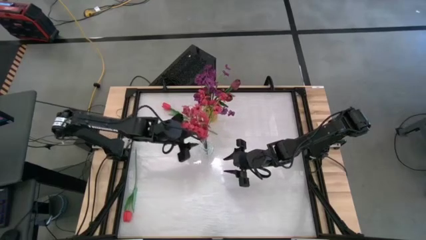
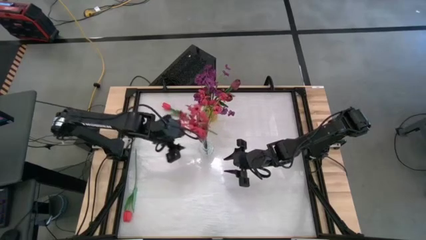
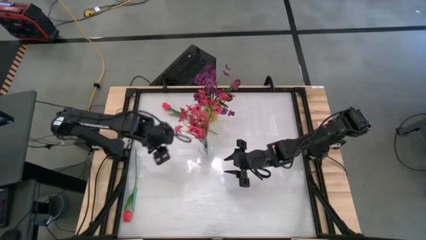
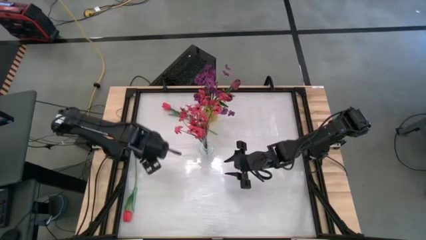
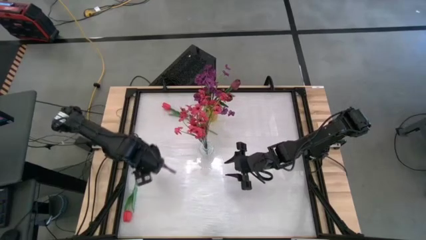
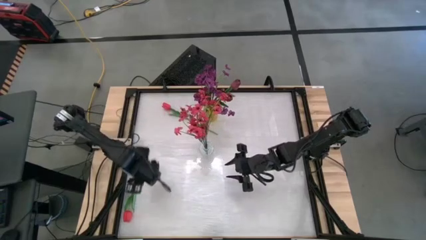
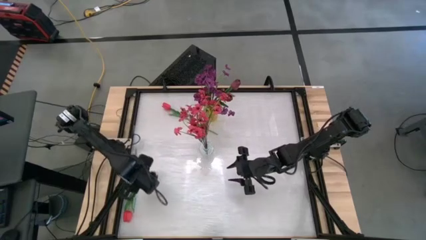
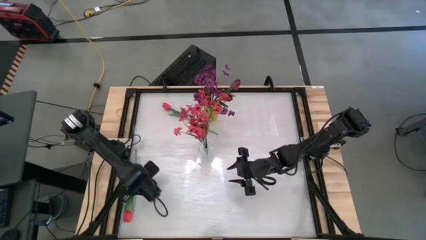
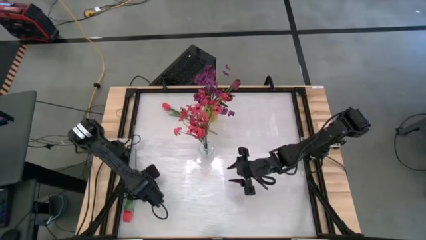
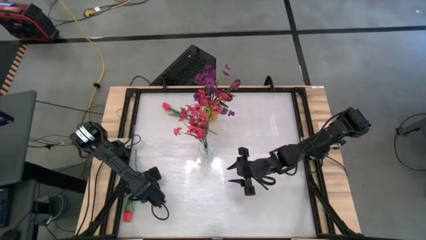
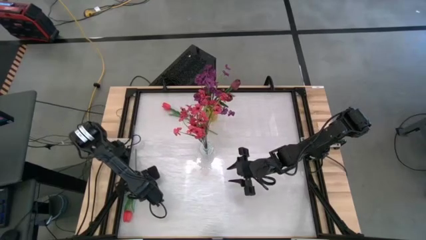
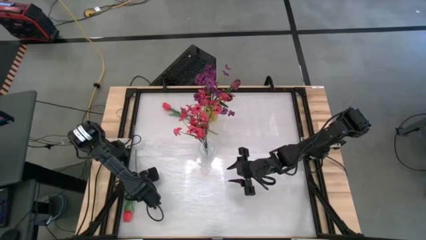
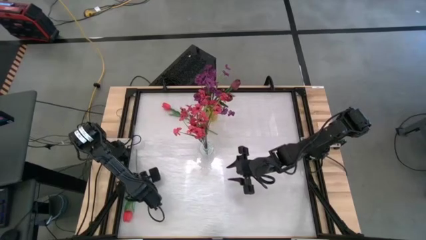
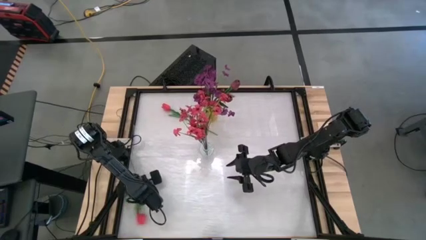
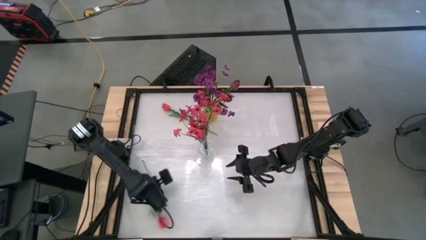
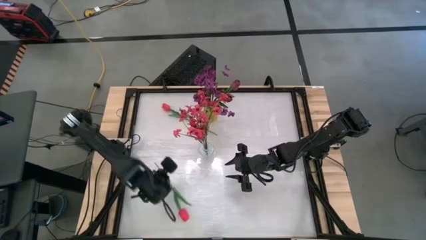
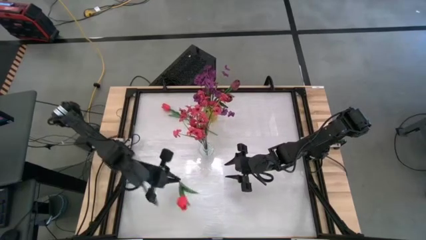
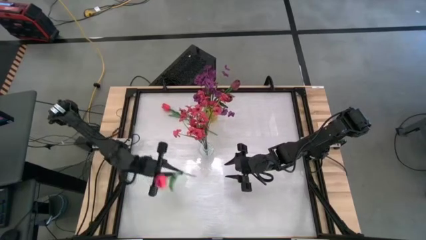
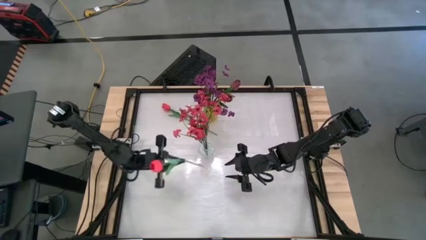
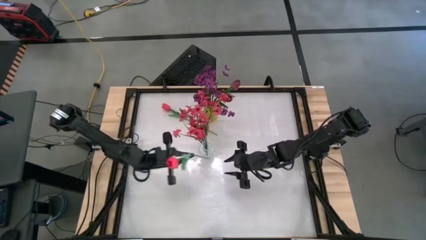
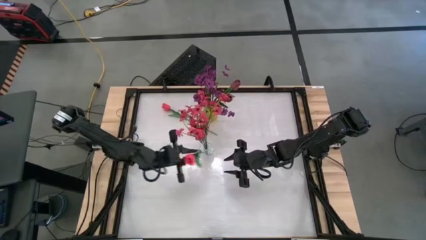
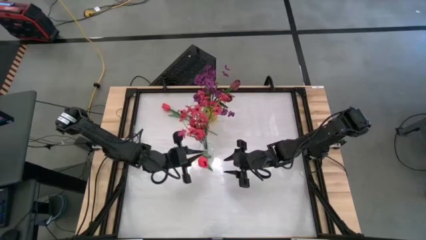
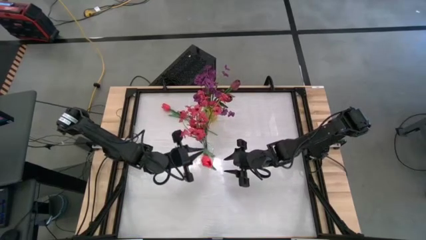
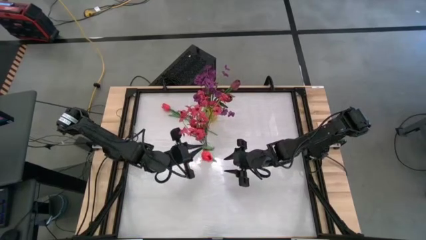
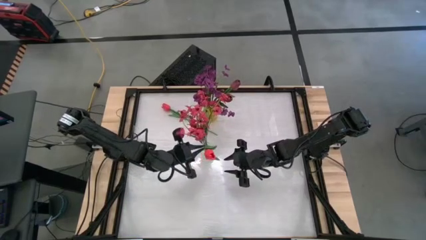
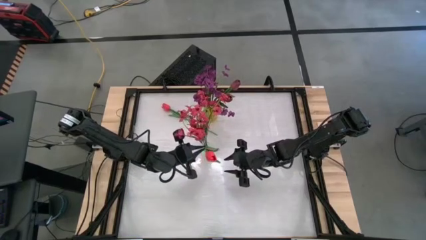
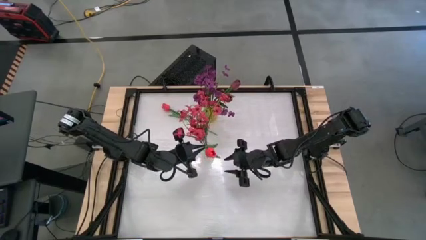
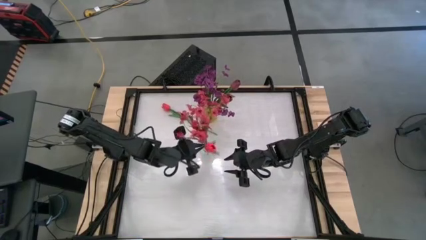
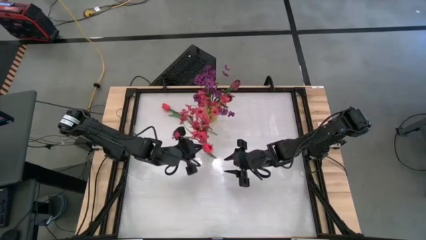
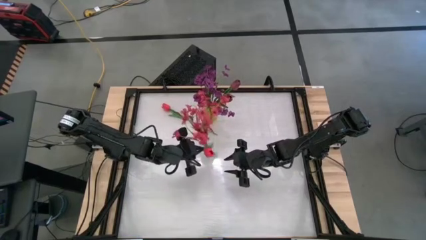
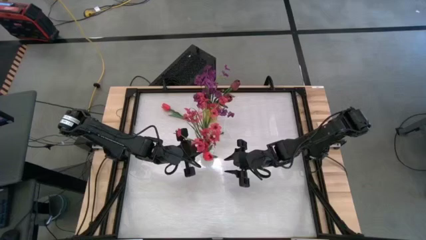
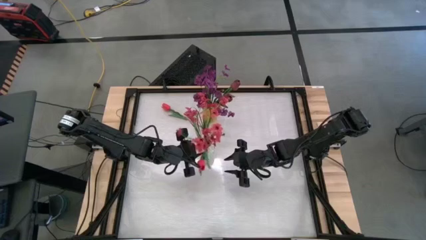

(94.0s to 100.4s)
Task: Sort flowers into vase by color
Put the bottom pink flower into the transparent vase

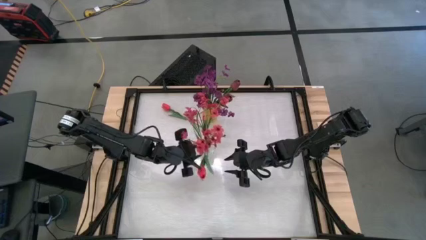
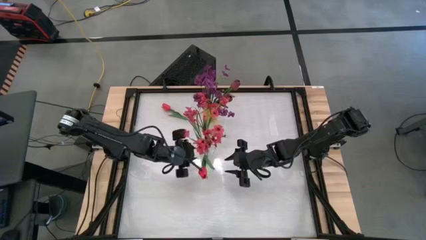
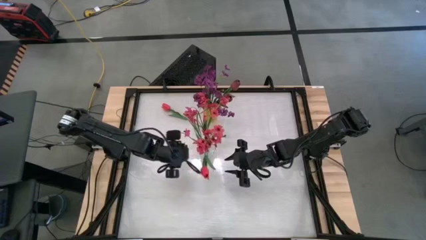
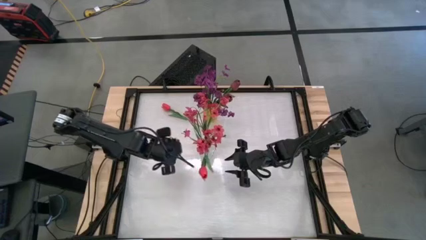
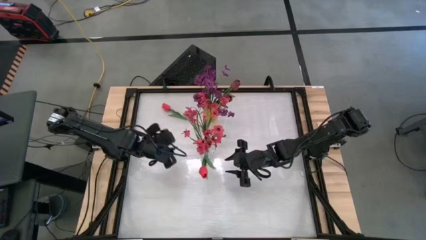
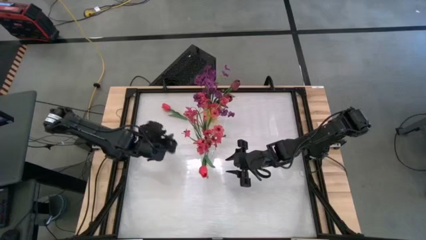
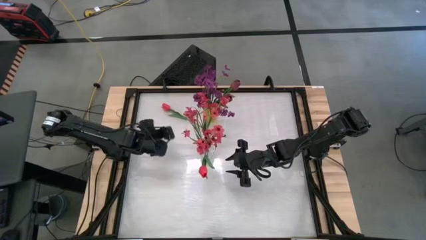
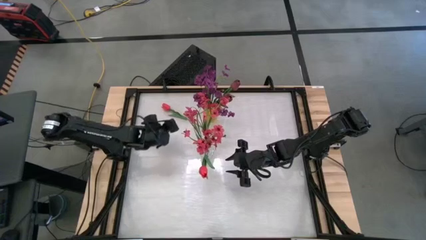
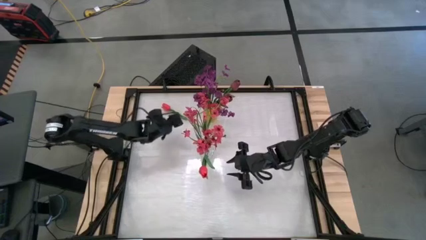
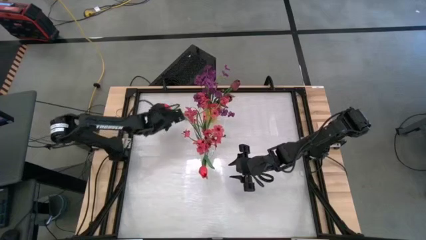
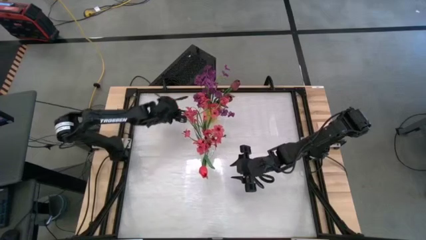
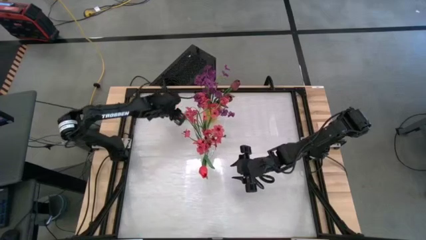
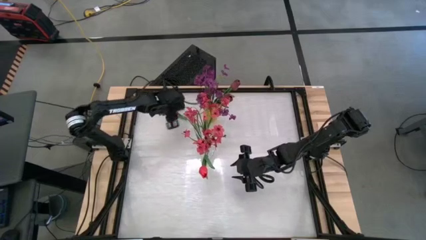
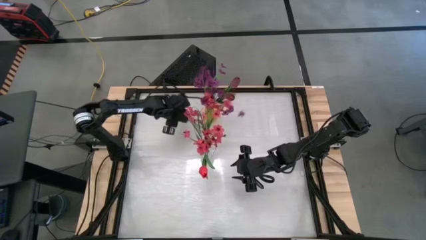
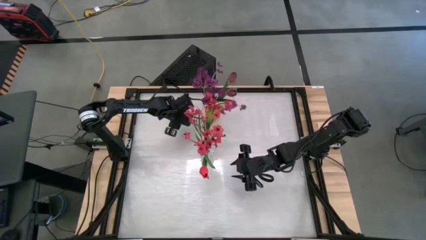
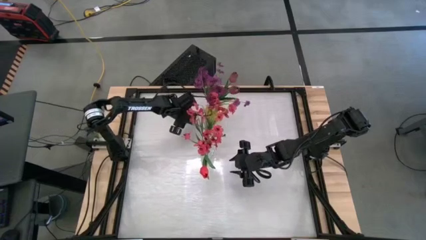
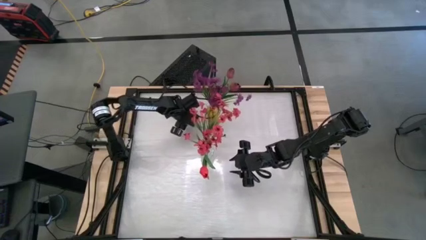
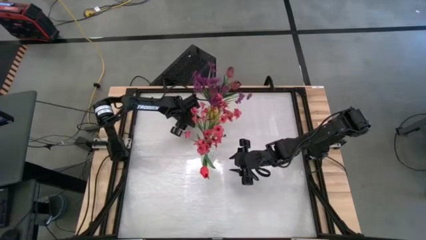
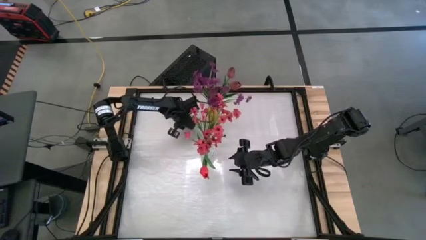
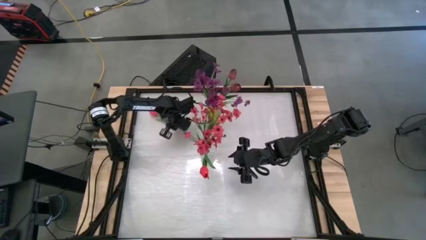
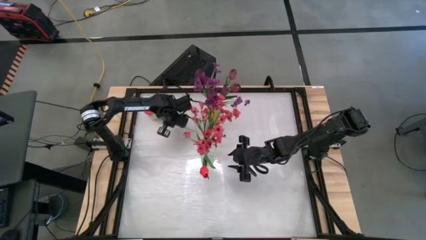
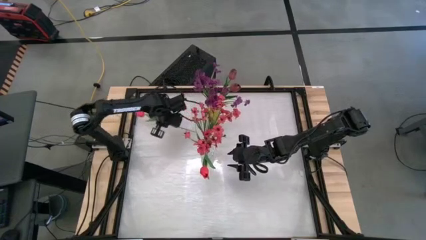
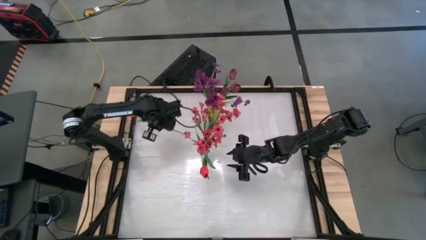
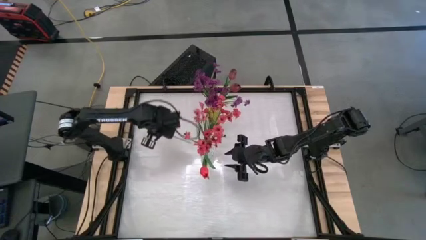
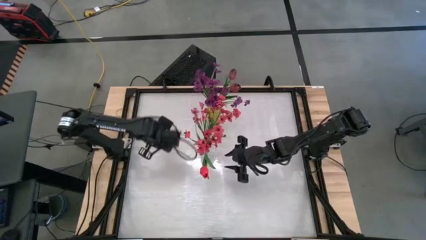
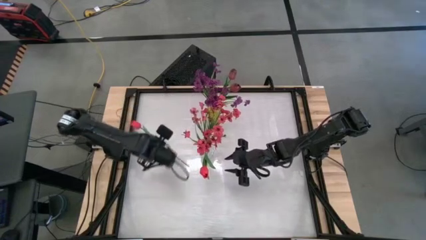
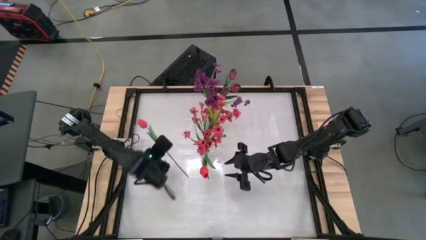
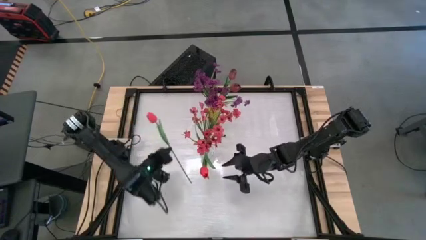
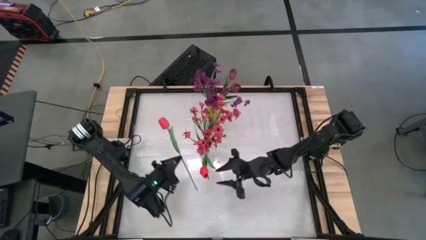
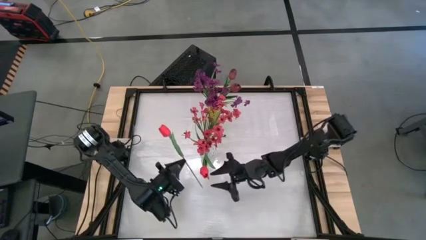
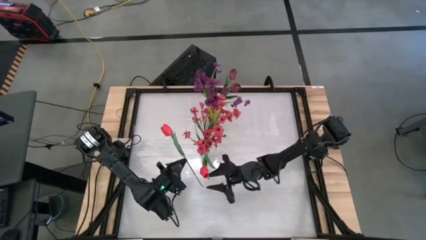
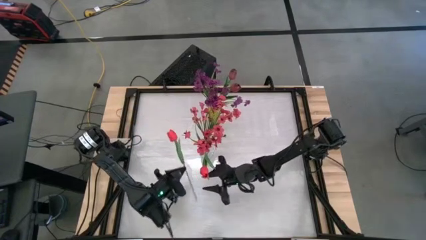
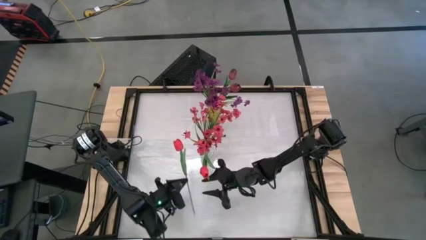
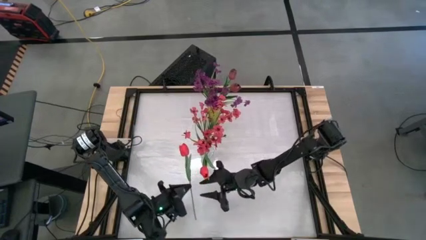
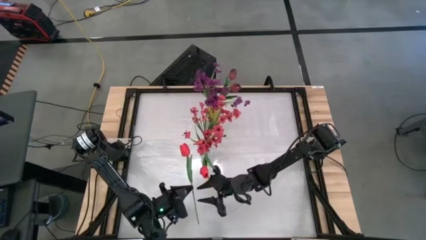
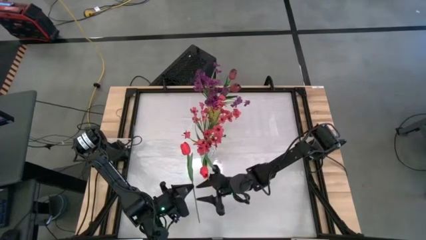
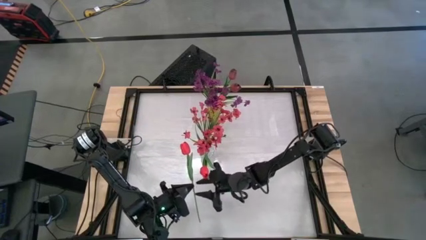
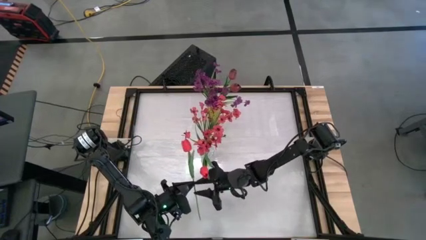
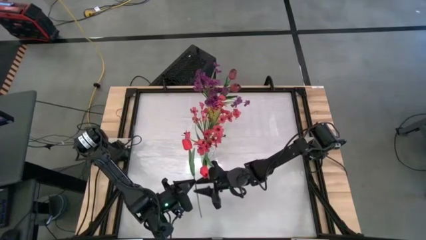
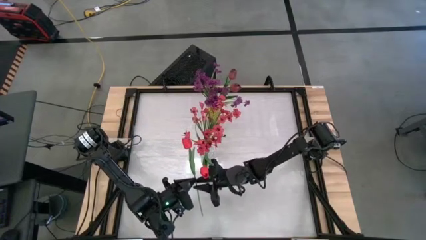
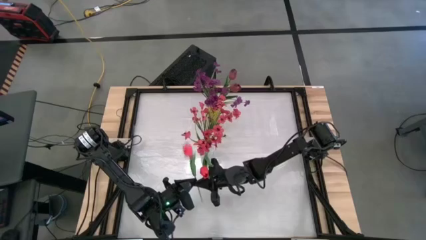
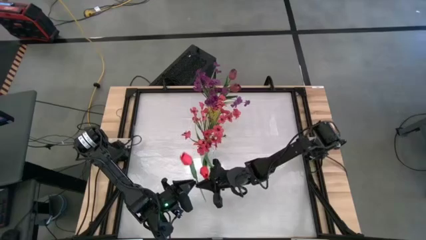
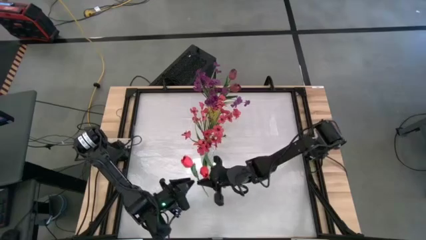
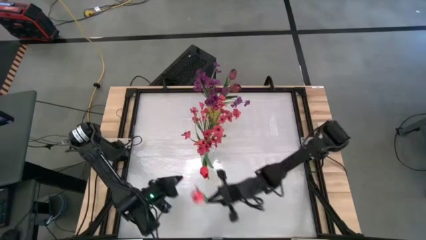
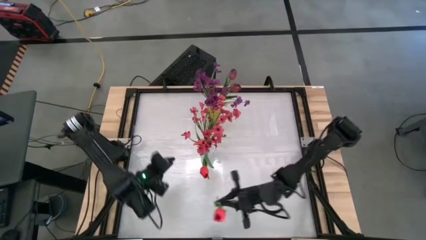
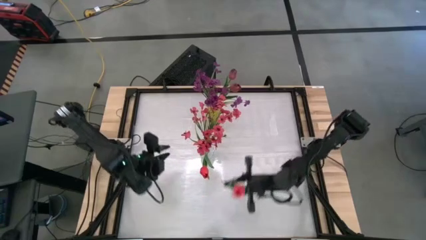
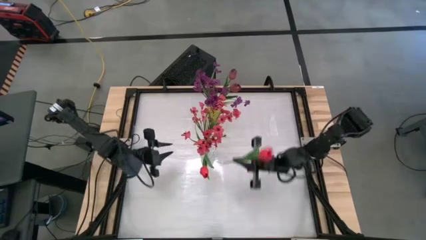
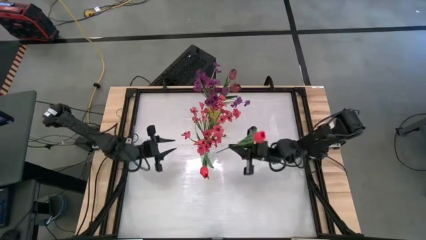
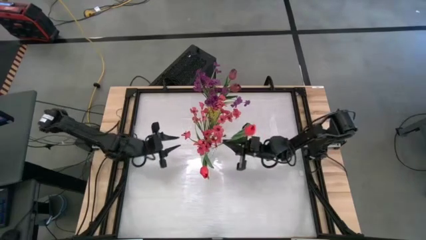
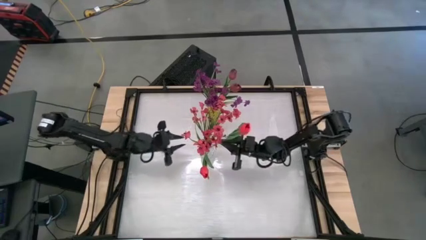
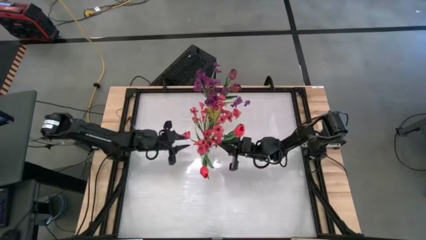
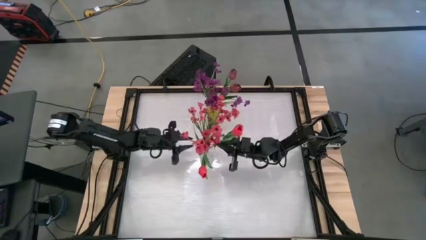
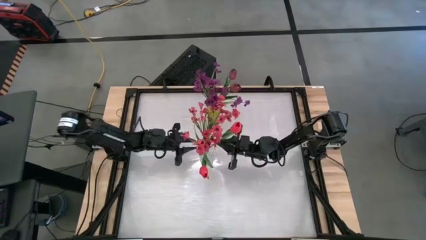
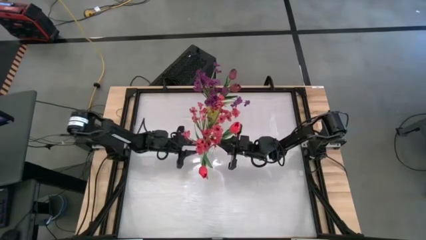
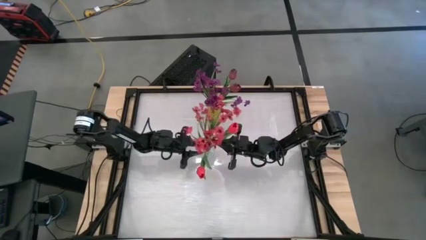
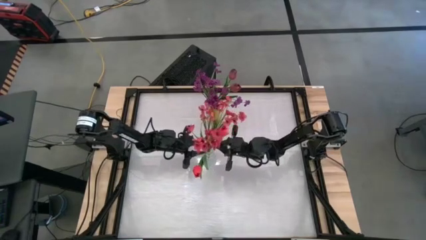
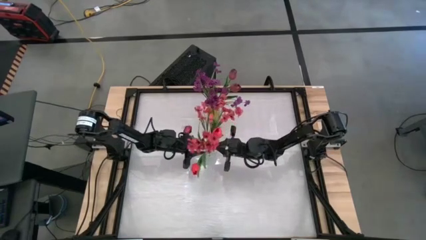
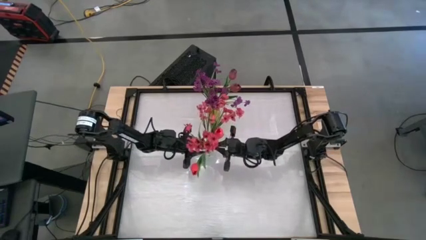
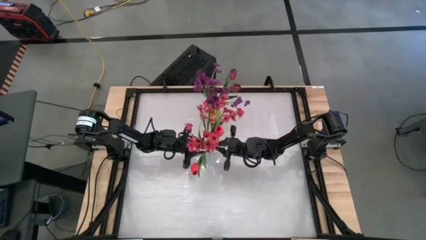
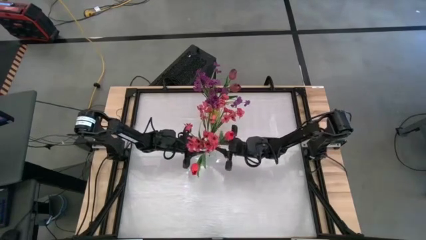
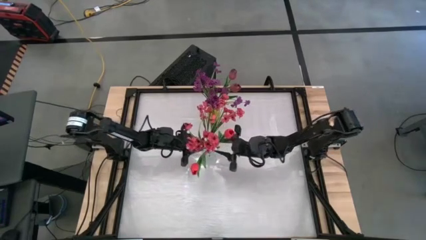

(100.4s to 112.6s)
Put the pink flower into the transparent vase
